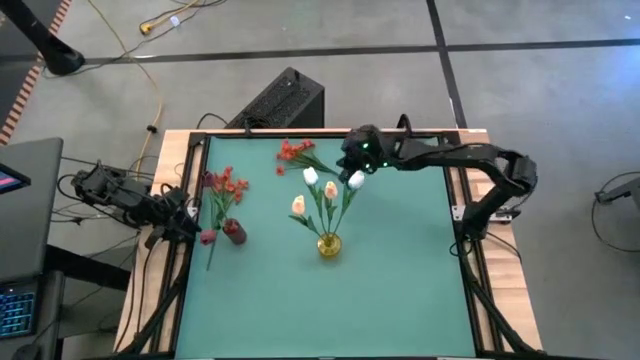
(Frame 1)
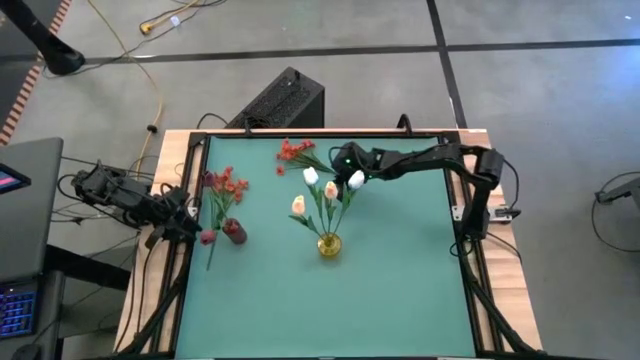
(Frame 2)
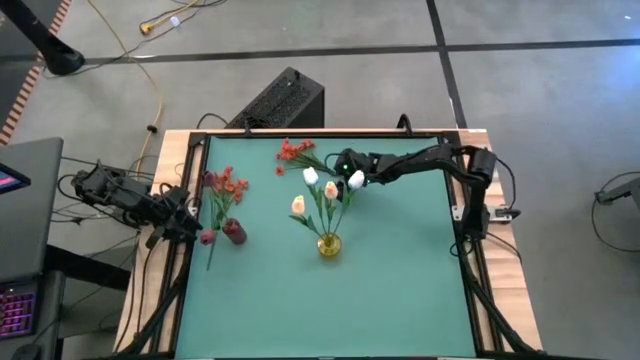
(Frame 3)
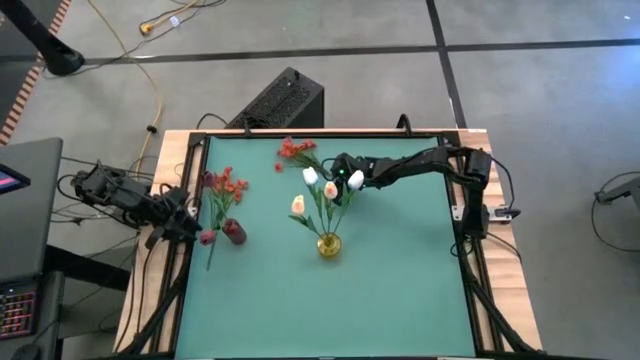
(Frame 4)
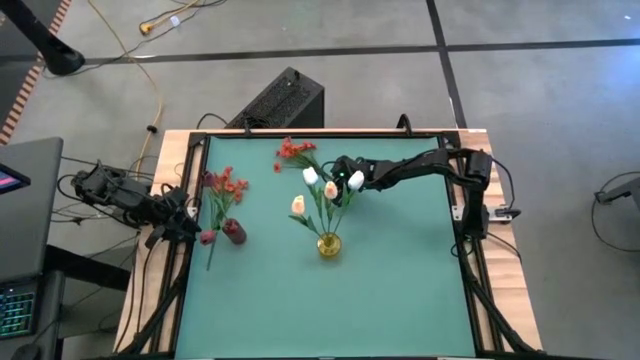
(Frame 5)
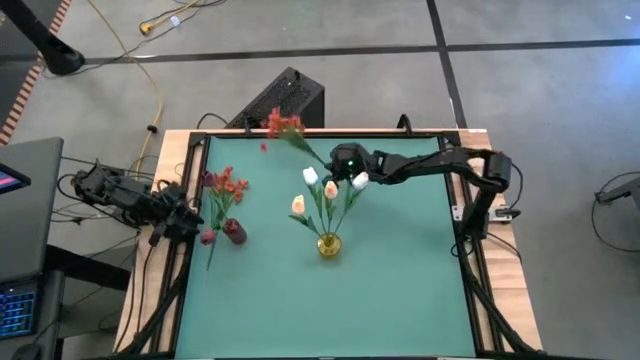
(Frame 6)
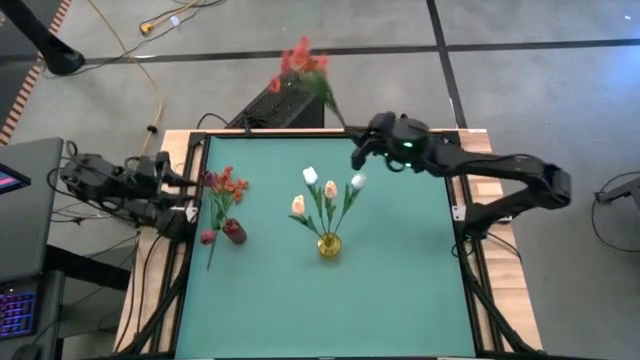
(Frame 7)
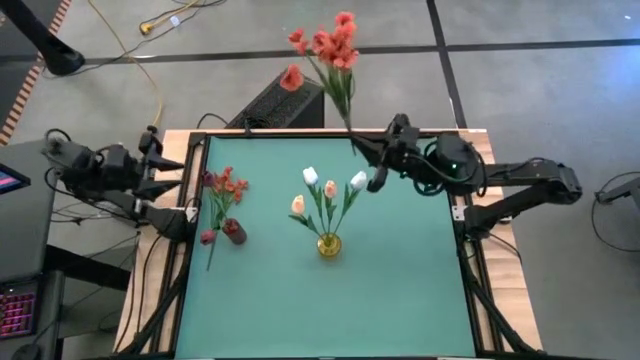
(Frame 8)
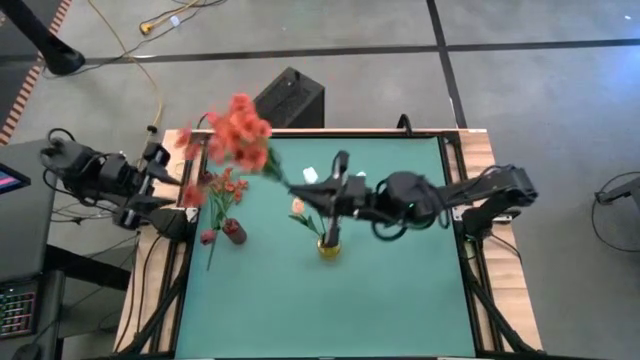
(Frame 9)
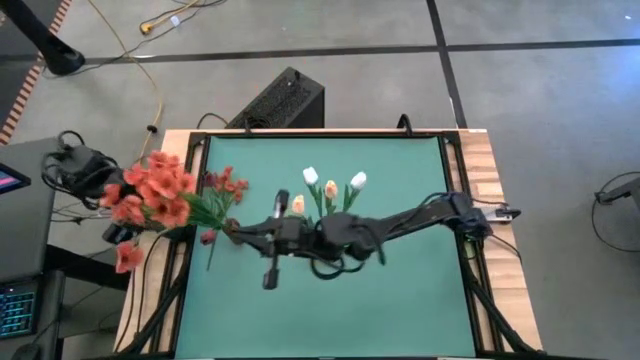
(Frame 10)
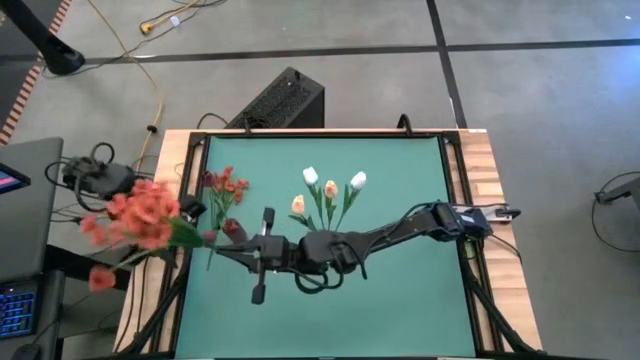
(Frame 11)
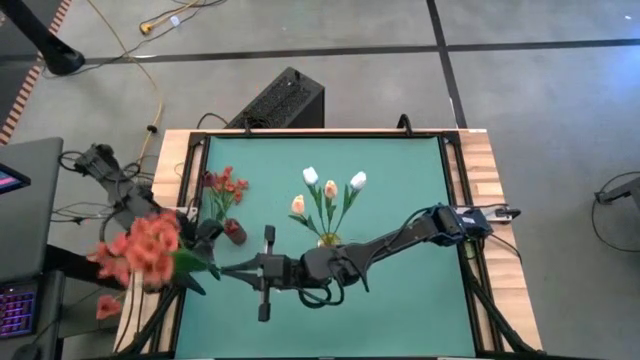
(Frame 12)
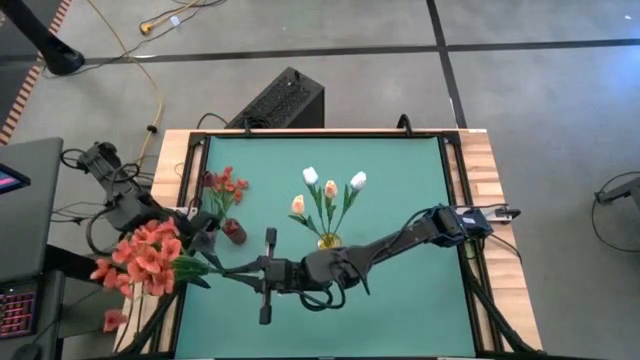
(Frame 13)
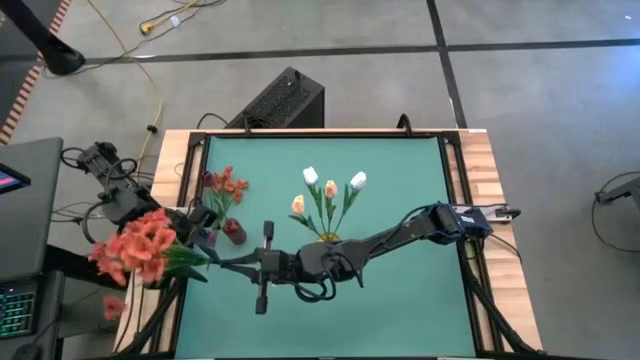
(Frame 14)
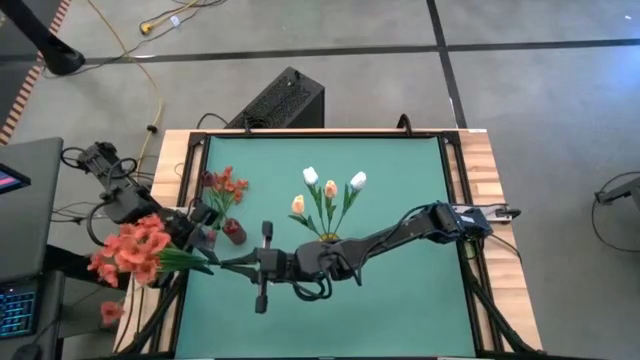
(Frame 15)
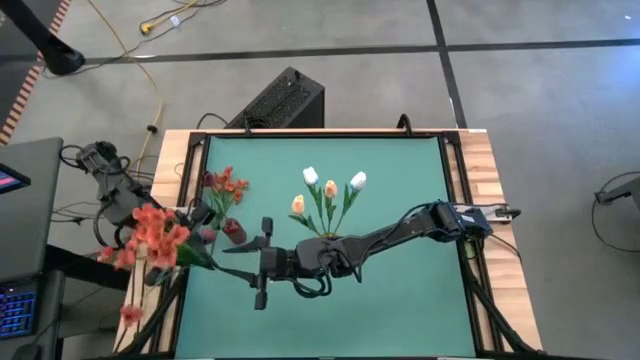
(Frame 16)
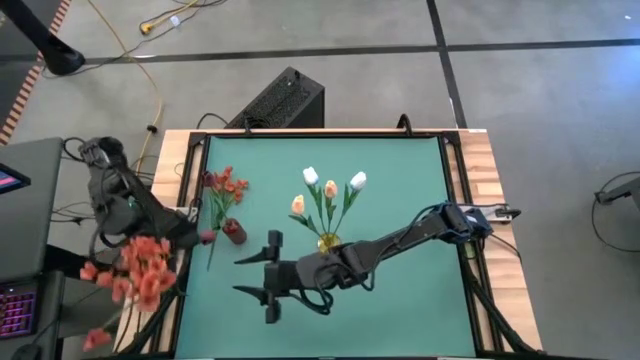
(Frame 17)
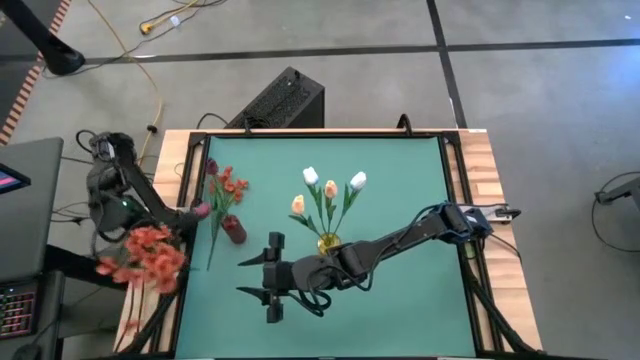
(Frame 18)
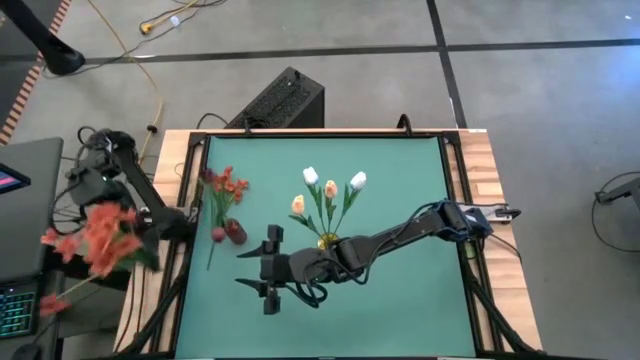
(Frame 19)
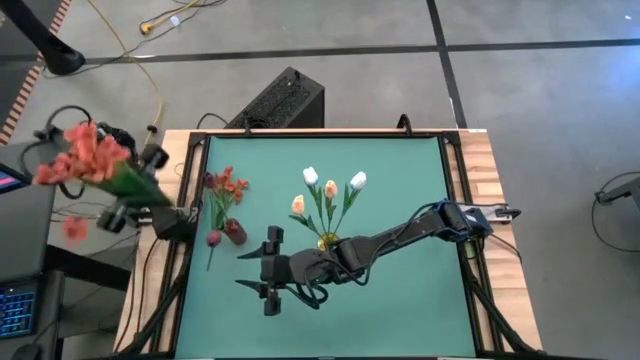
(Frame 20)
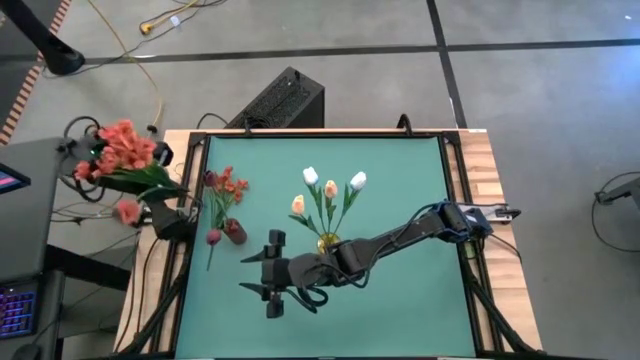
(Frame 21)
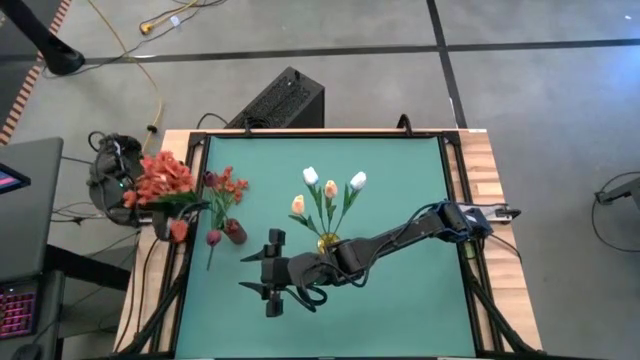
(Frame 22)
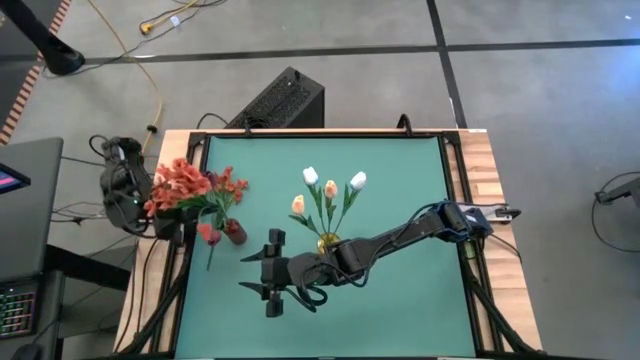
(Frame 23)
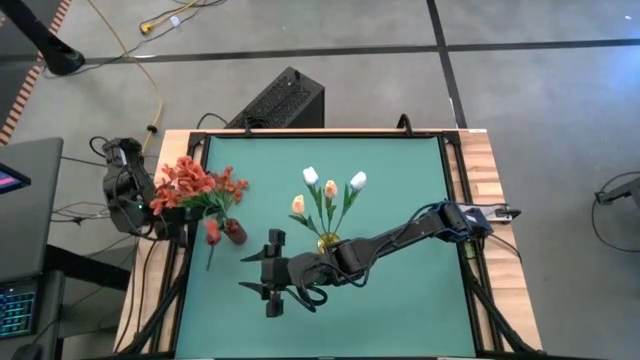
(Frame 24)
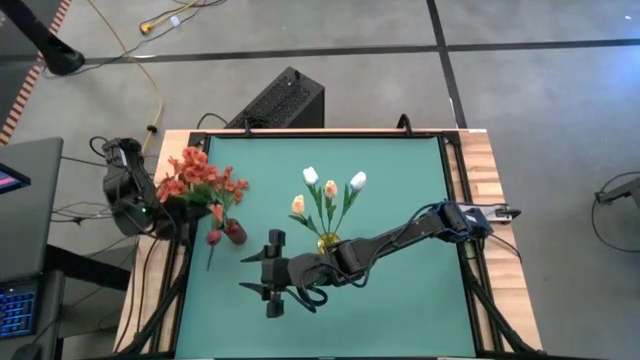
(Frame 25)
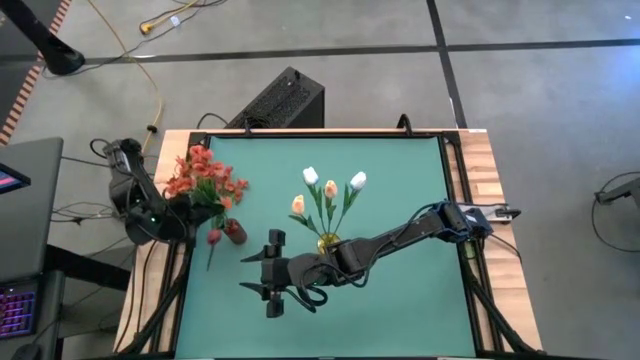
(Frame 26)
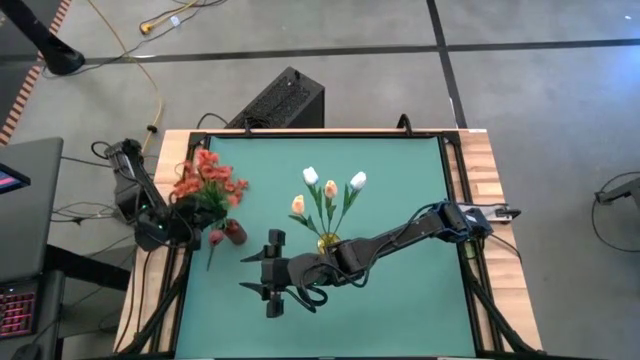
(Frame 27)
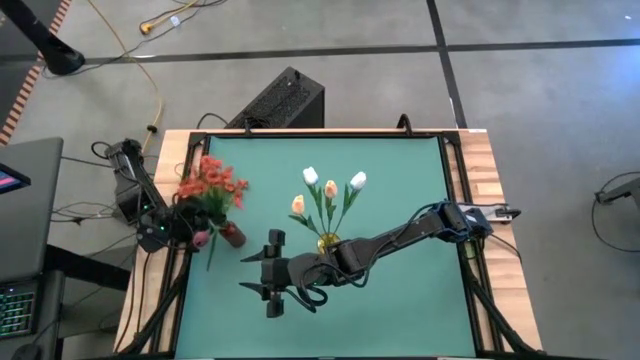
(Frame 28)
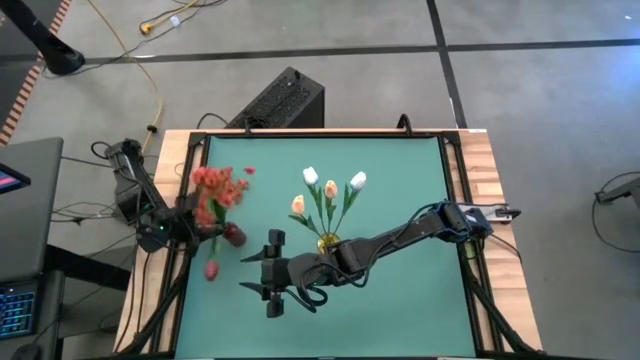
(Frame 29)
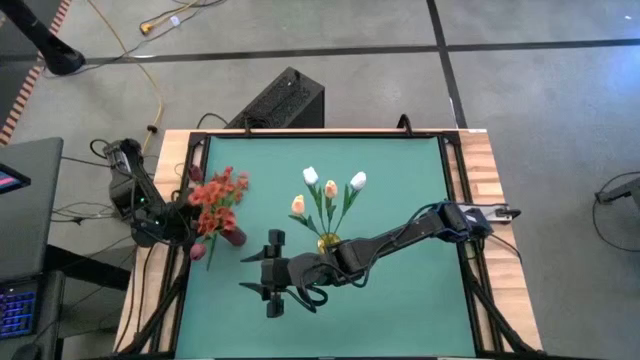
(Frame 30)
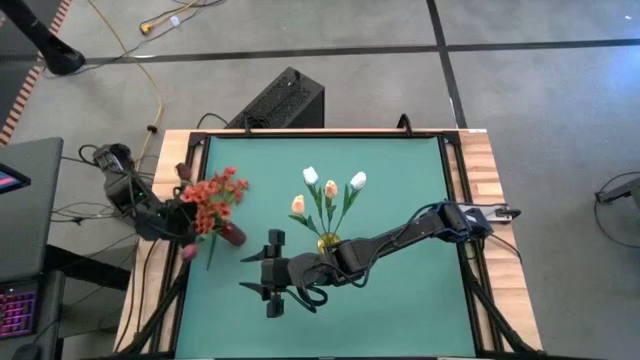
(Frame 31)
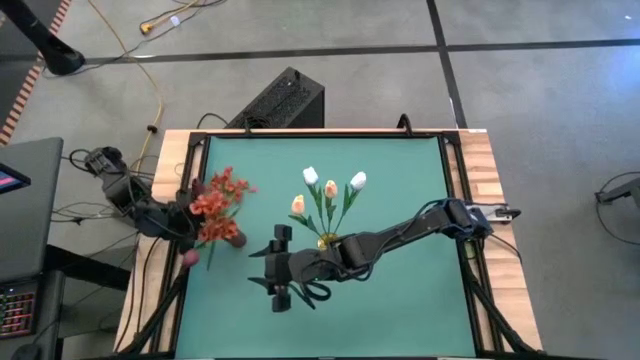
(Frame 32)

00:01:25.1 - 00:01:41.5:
Task: Sort flowers into vase by color
Put the right orange flowers into the red vase

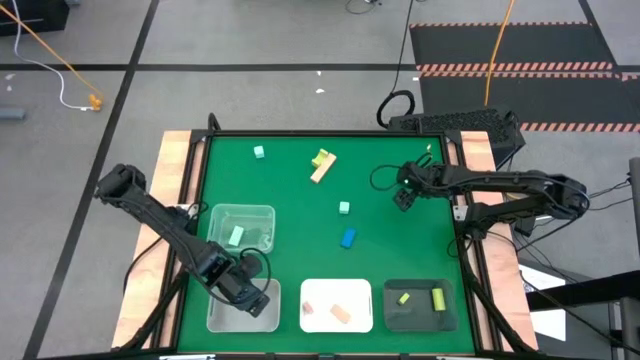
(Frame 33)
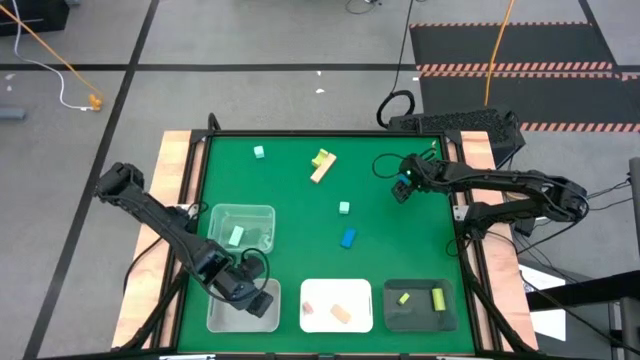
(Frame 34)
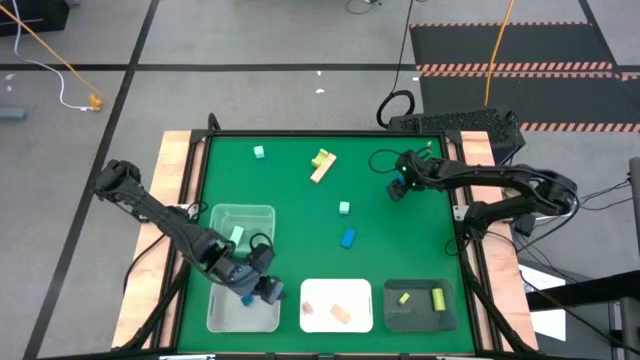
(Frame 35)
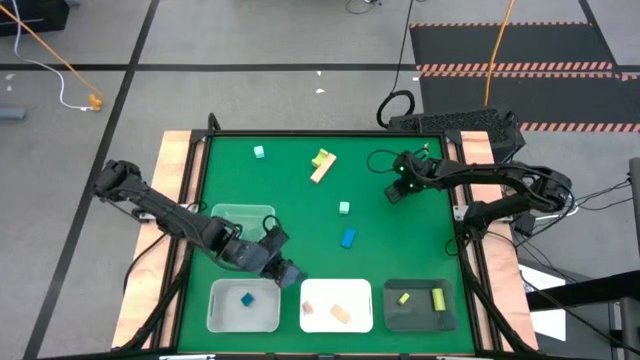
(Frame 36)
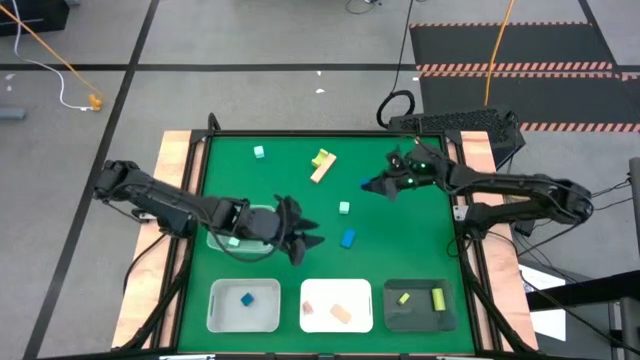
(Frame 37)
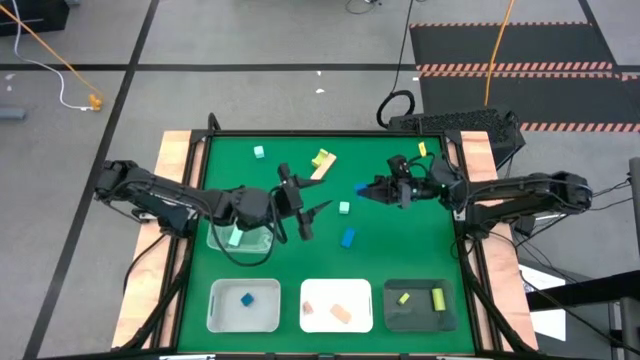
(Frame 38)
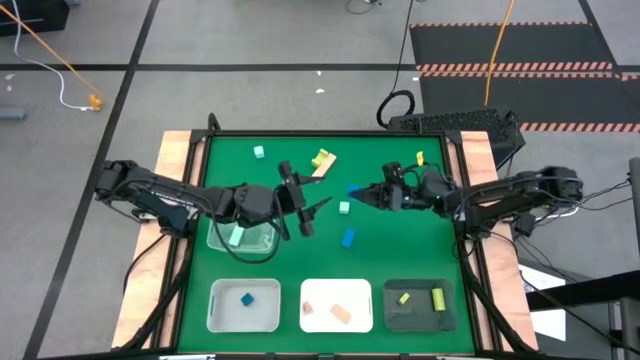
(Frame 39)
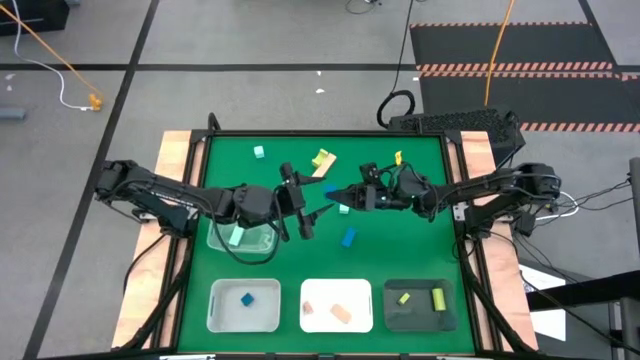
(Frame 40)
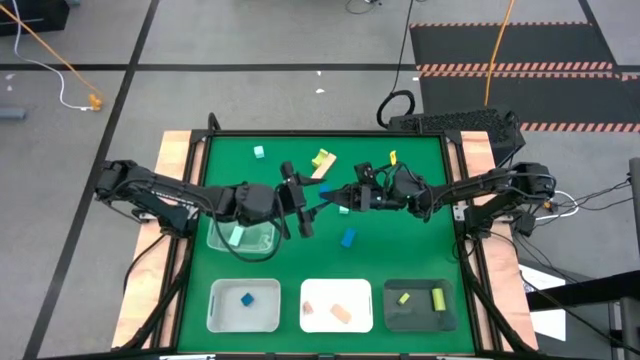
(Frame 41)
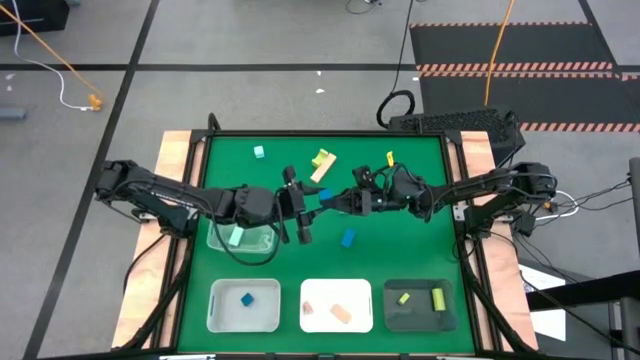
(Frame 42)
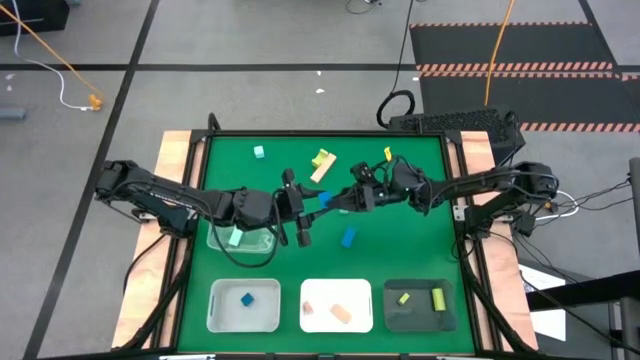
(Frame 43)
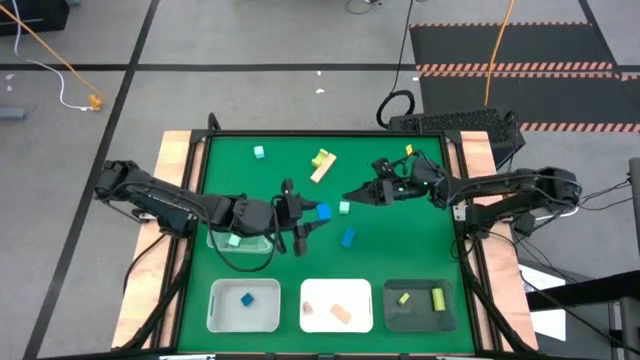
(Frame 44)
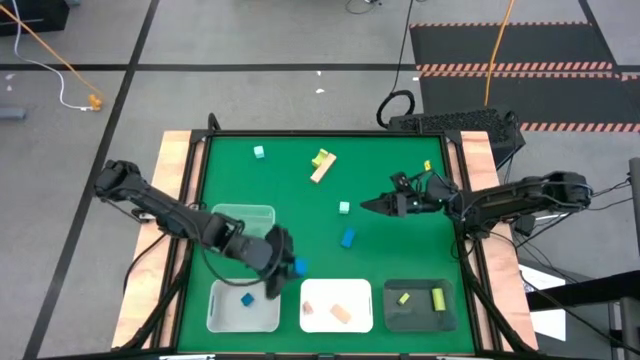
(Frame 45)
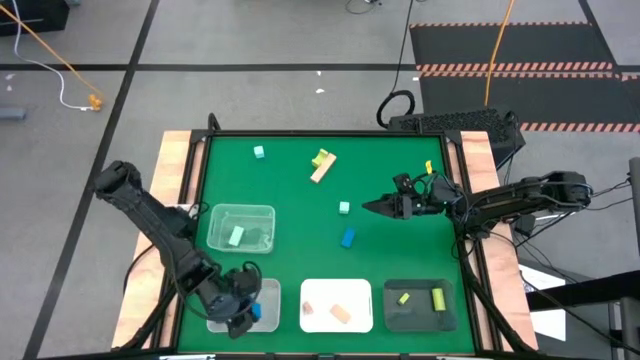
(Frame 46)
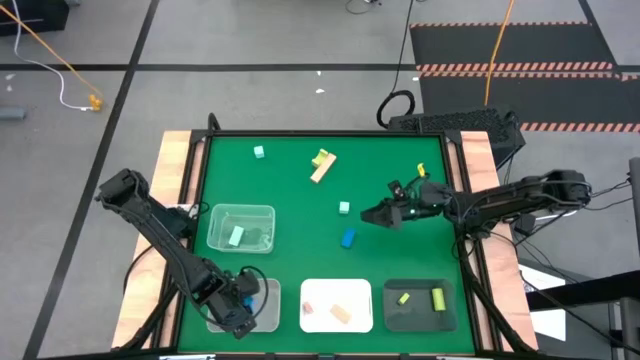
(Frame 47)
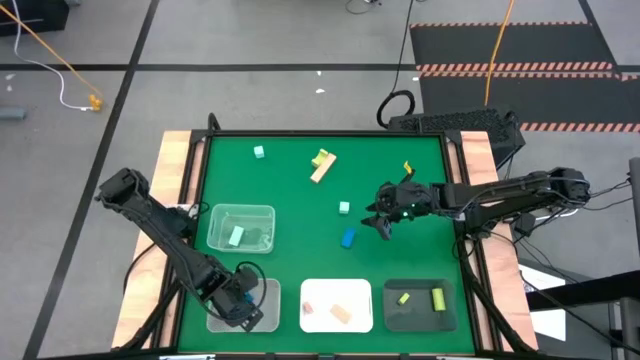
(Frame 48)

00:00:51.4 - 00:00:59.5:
Task: Sort & place blocks by color
Put the top blue block into the gray bin
